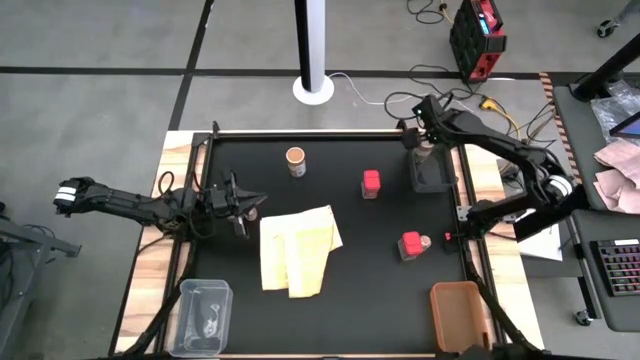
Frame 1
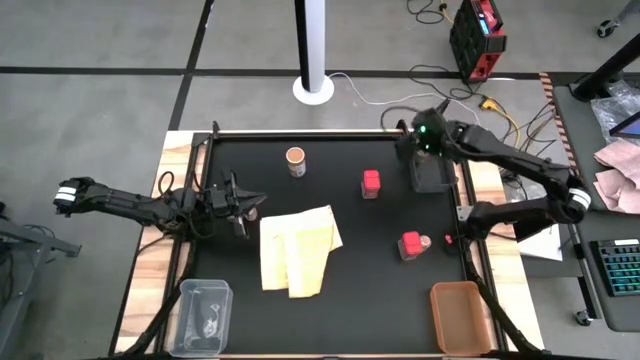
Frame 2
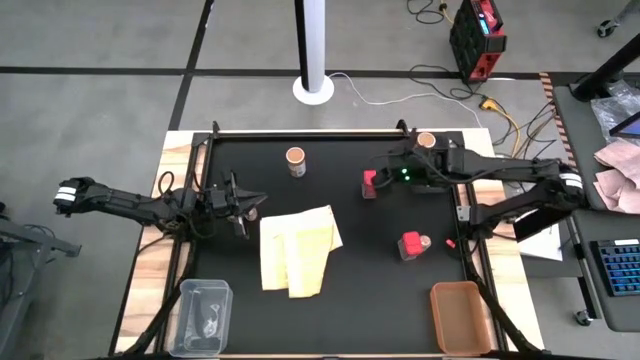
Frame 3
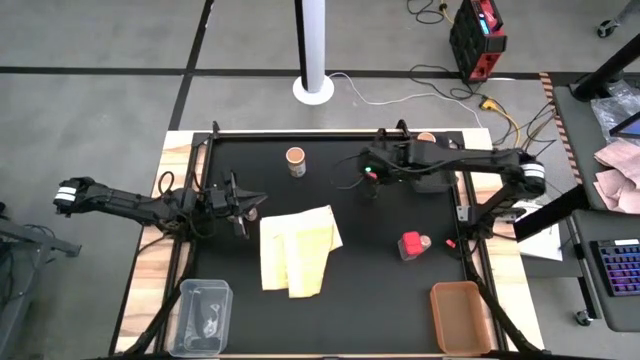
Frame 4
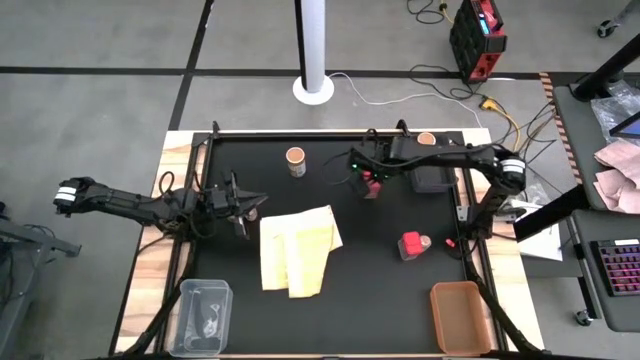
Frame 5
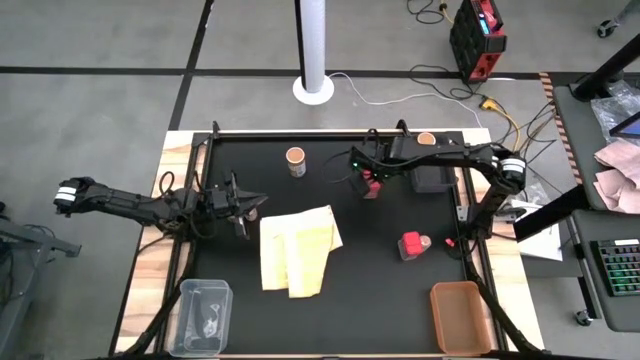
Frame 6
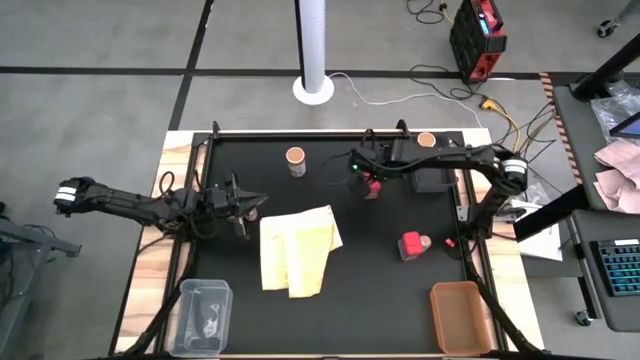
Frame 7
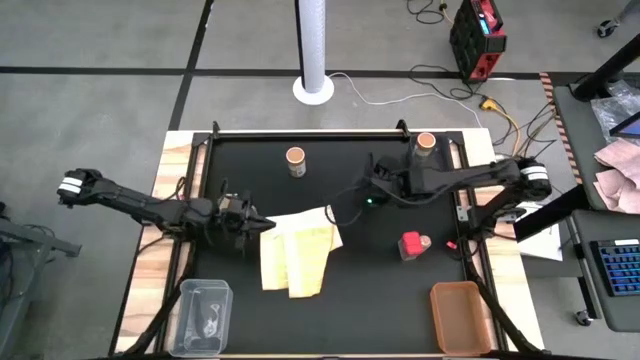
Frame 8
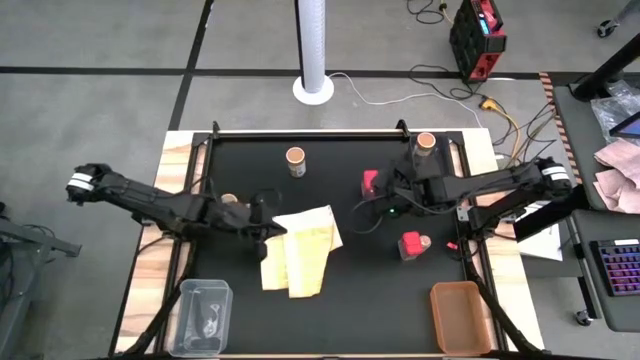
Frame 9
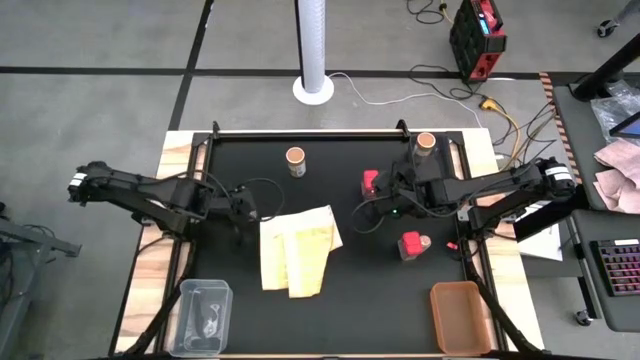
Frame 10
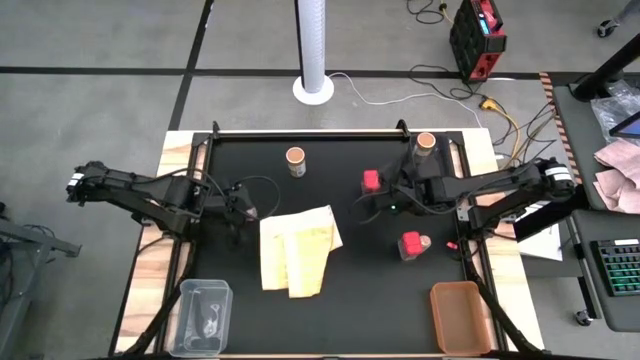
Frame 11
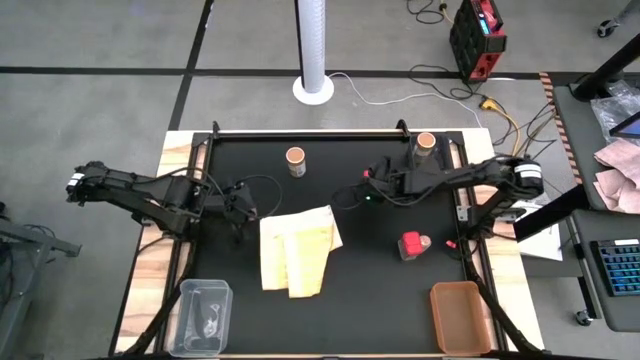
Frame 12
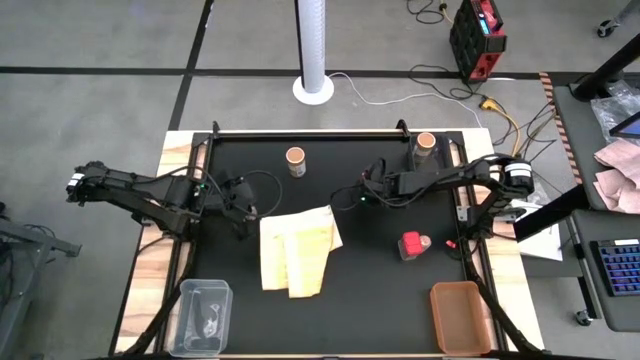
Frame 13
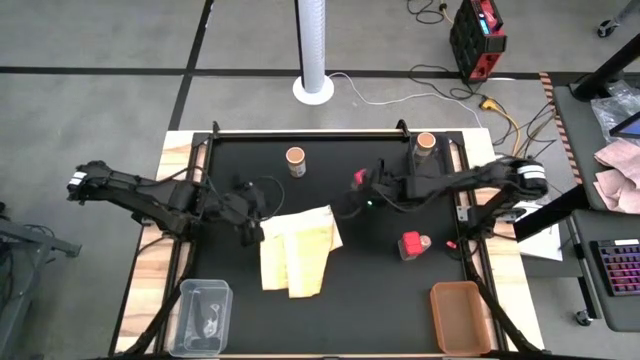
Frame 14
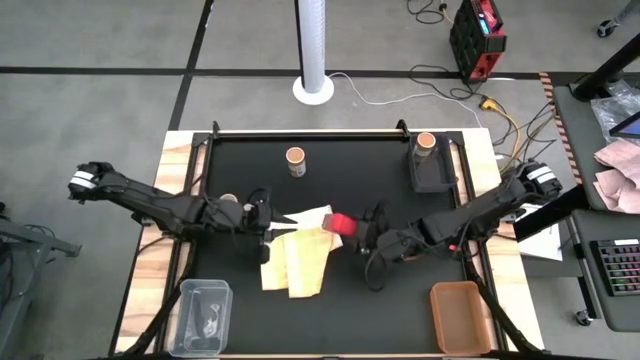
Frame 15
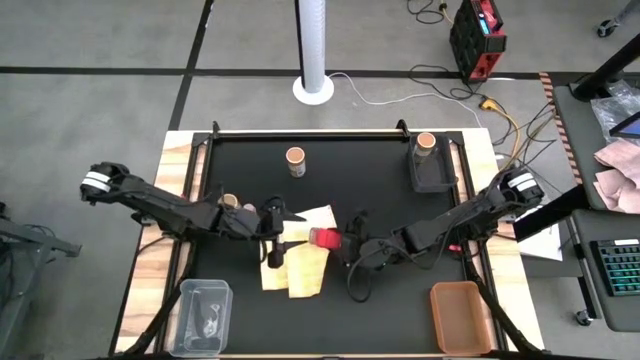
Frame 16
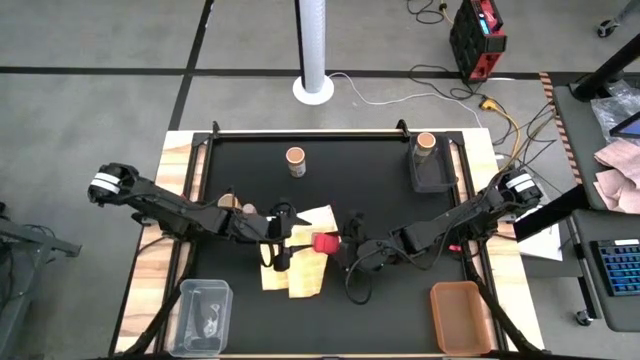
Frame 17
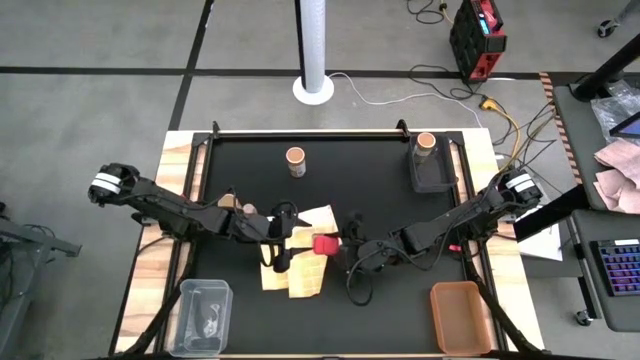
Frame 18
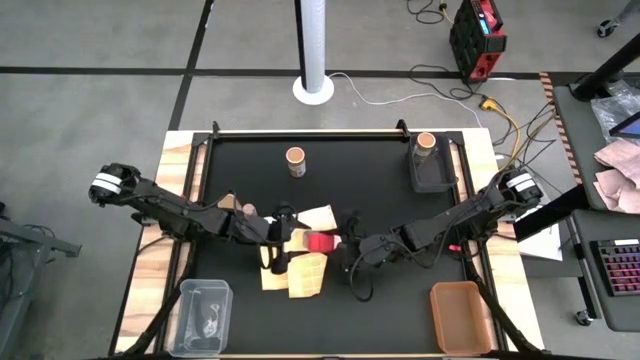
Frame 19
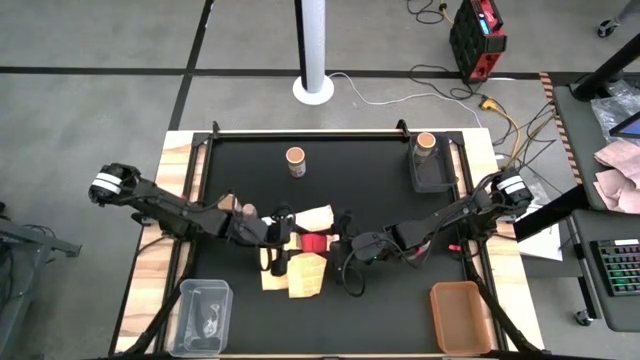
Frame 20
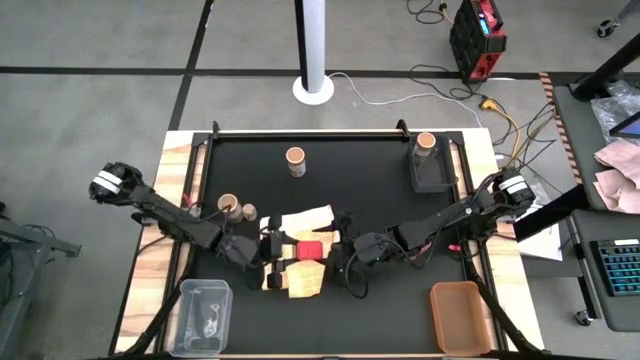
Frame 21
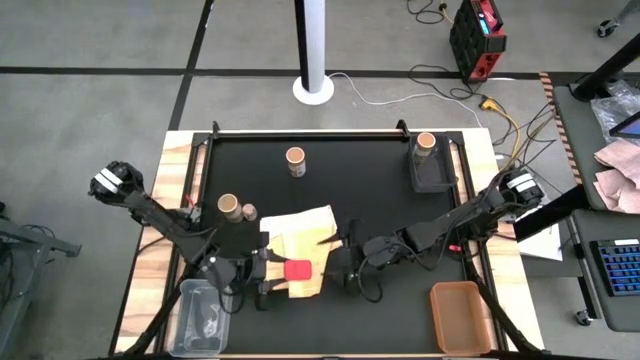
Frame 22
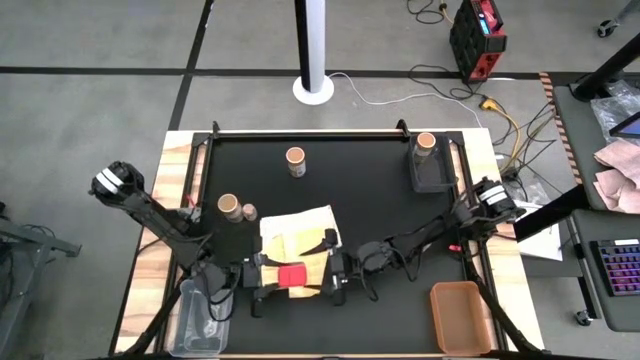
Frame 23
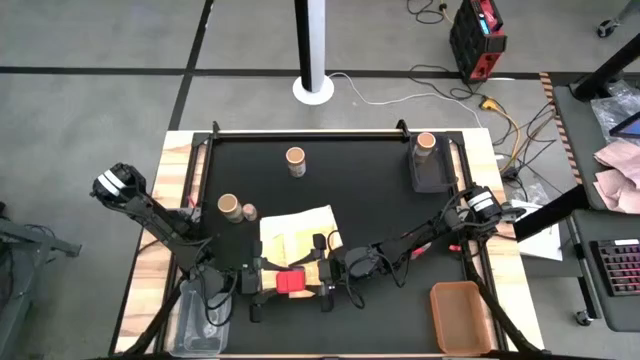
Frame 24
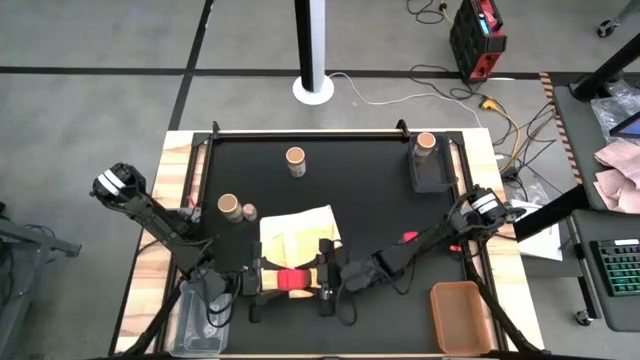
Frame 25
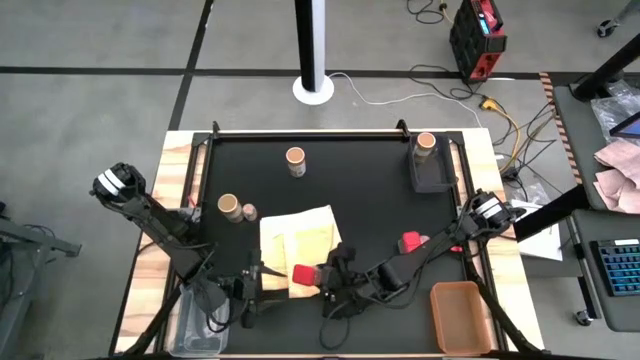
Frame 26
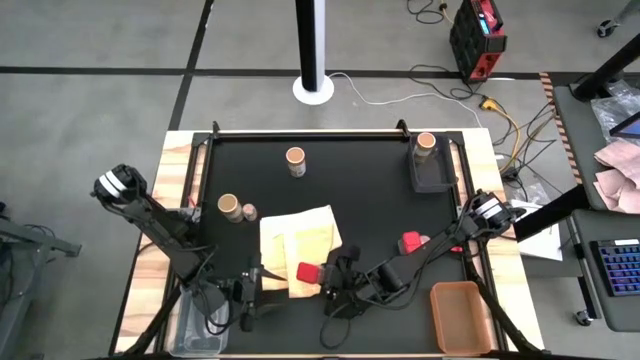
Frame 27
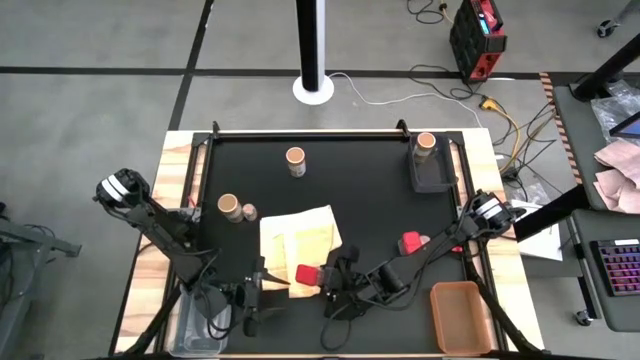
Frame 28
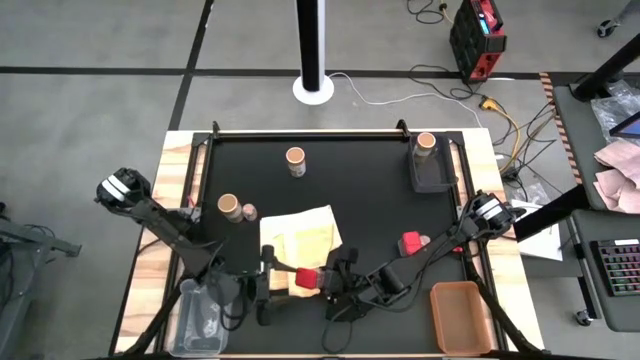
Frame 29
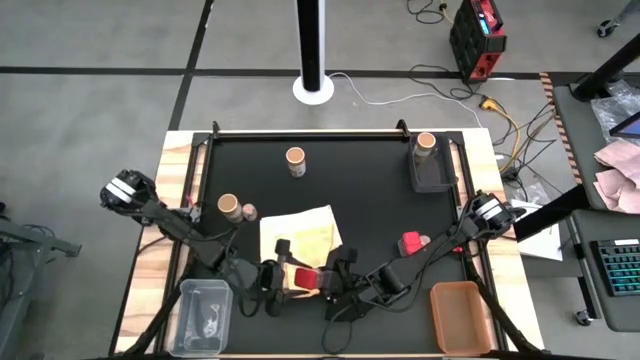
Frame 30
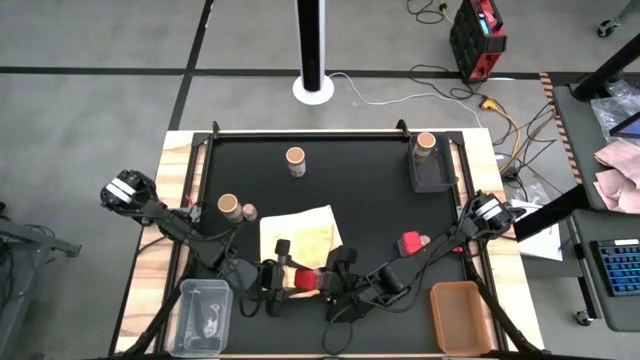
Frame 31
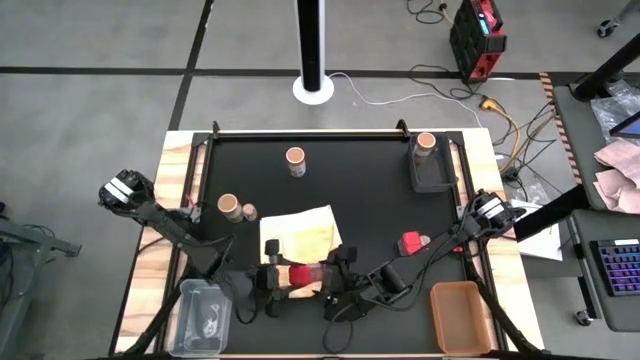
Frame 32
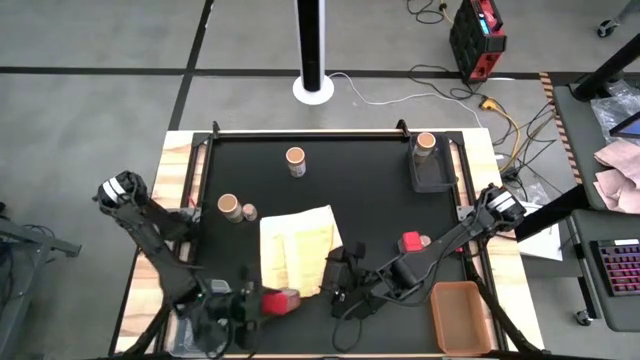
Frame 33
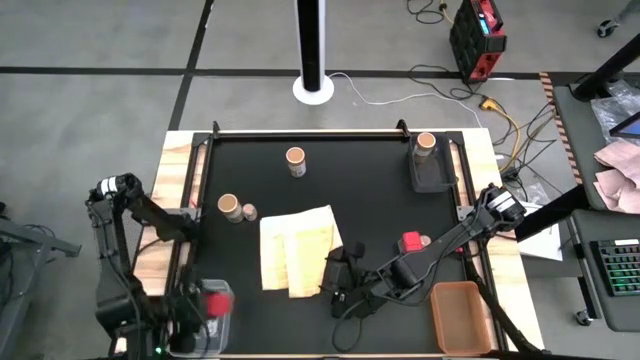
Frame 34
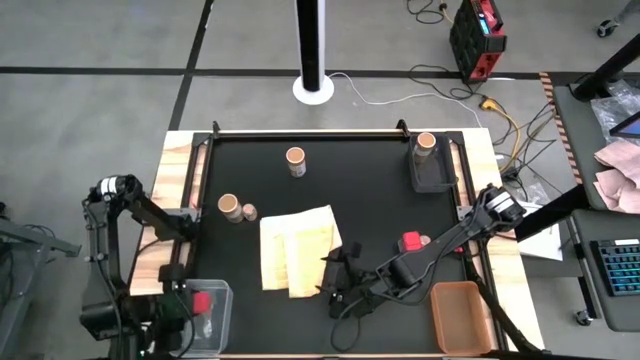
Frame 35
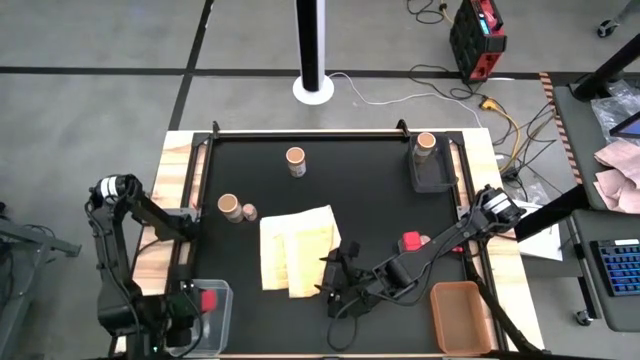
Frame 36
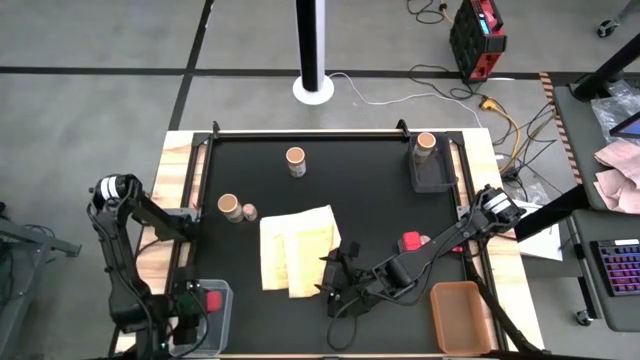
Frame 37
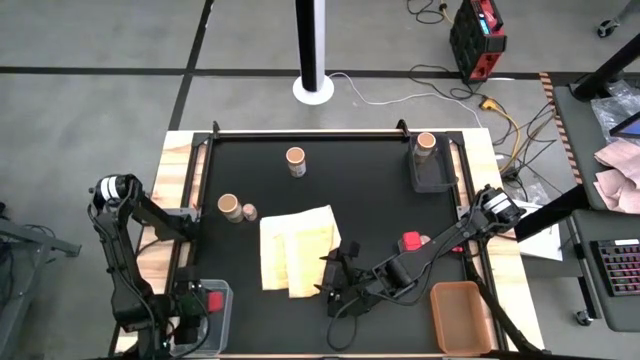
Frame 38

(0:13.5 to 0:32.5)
Task: Sort spices by type
Put the top red spice can into the transparent bin

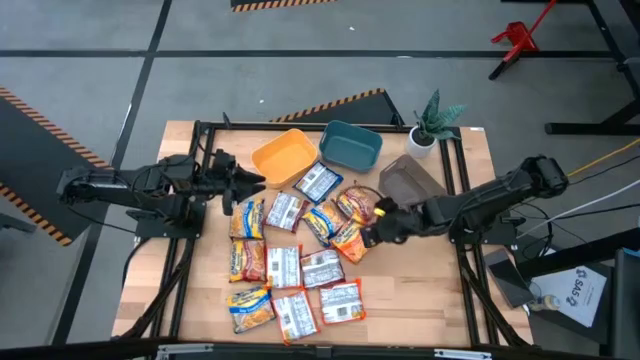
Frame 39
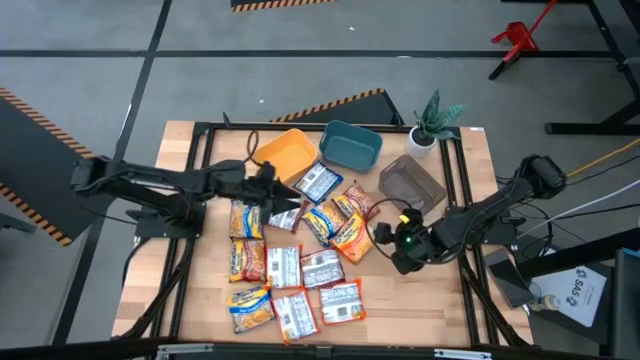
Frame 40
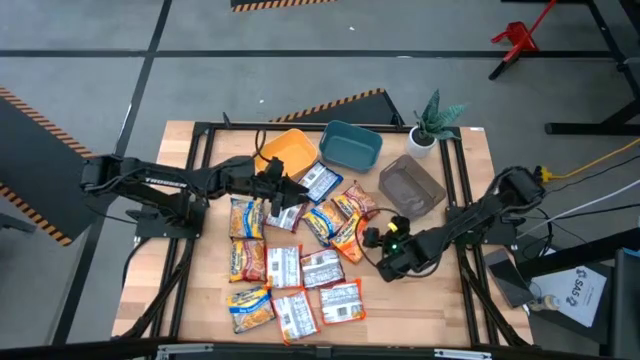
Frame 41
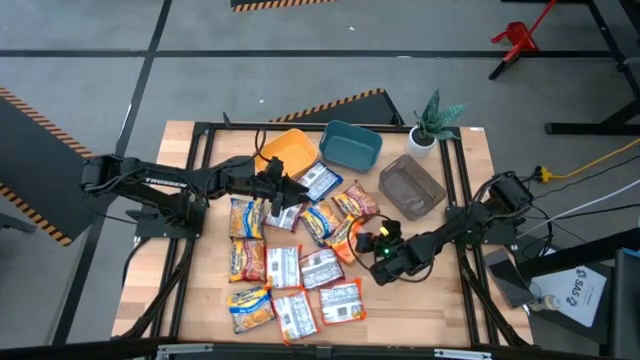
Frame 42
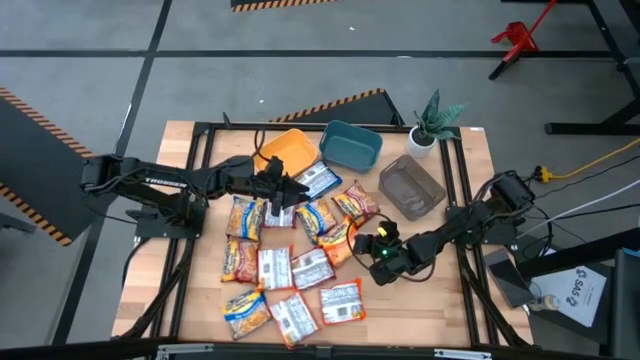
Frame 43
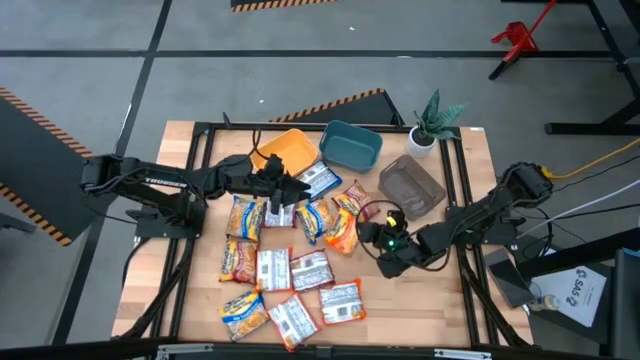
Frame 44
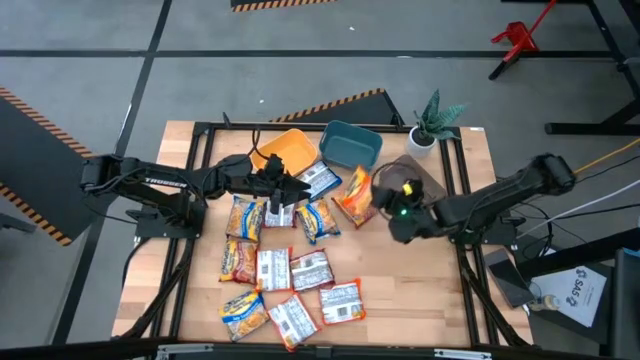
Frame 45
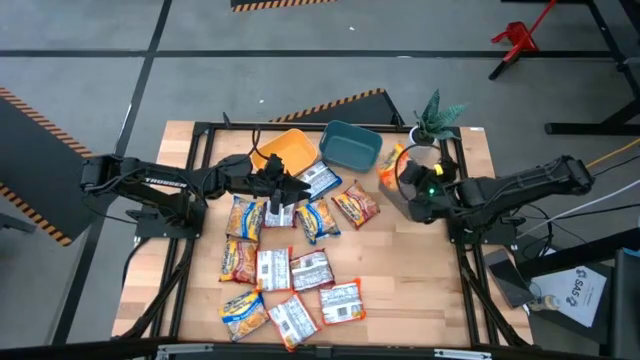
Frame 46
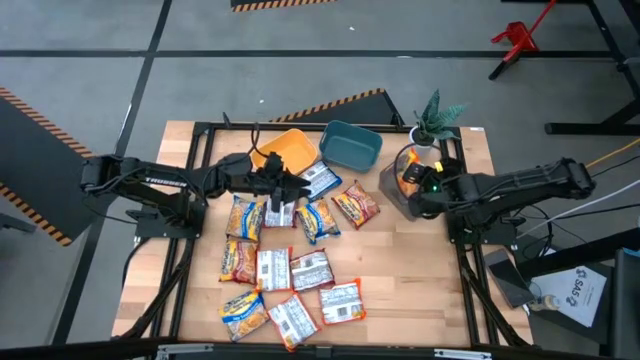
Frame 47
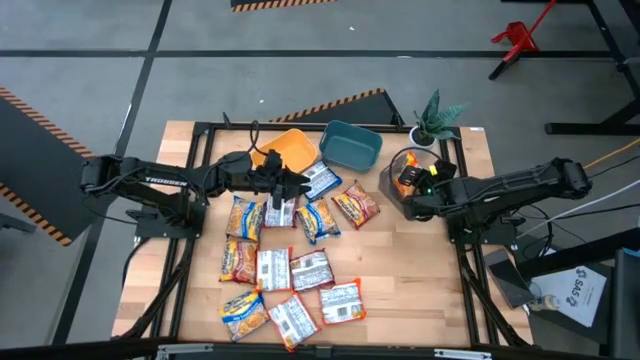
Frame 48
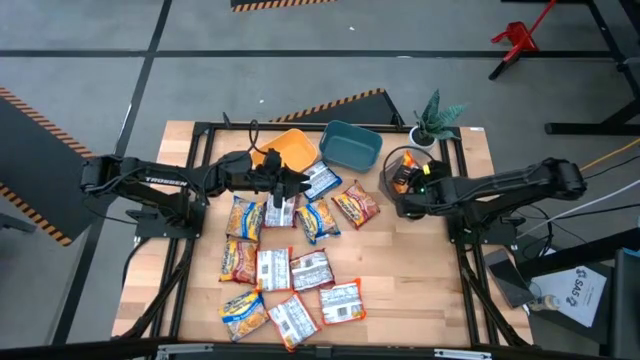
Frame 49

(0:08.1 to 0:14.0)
Task: Sort Maruchan noodles
Put the top right orange noodle pack into the black bin
